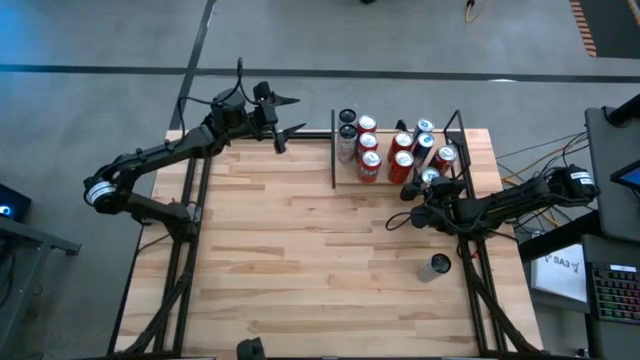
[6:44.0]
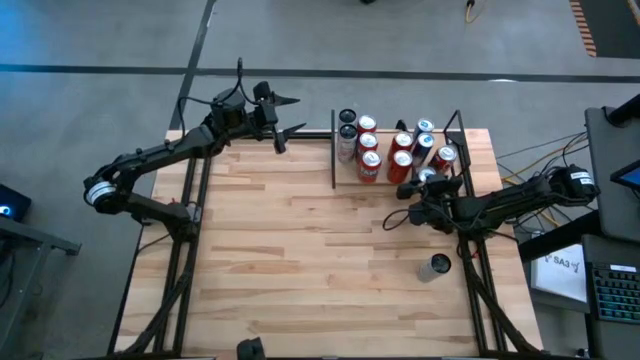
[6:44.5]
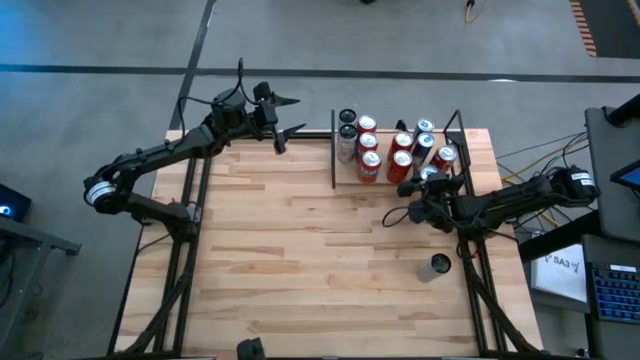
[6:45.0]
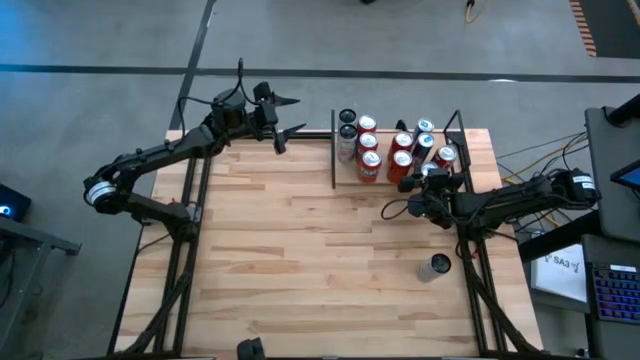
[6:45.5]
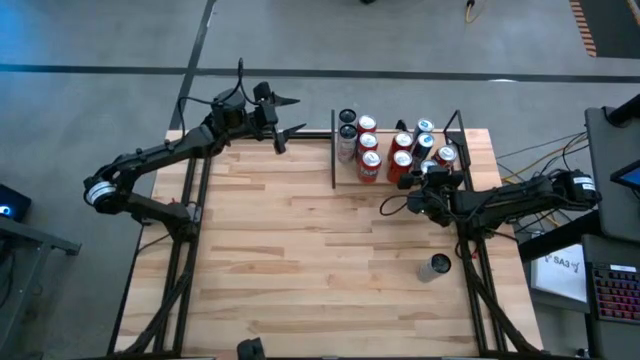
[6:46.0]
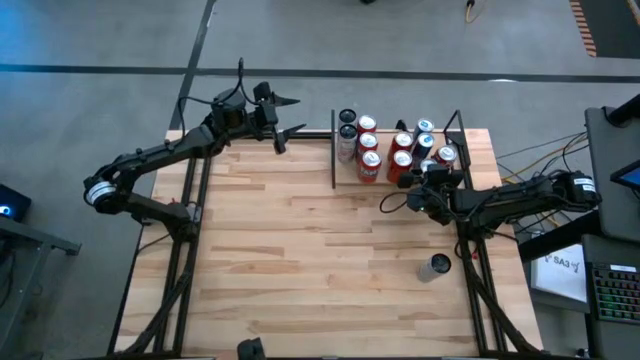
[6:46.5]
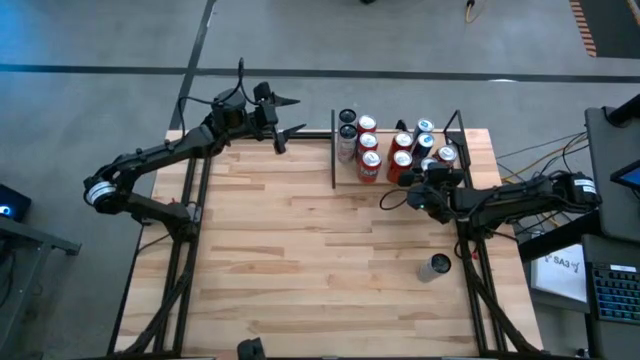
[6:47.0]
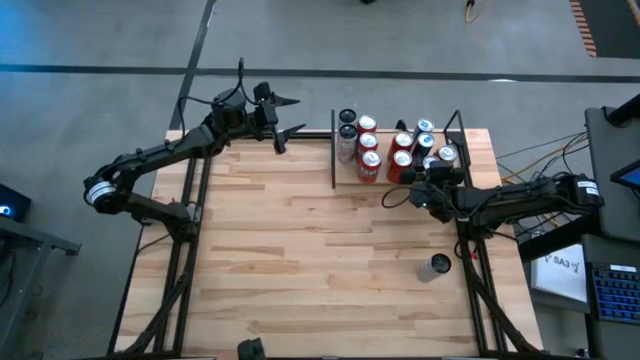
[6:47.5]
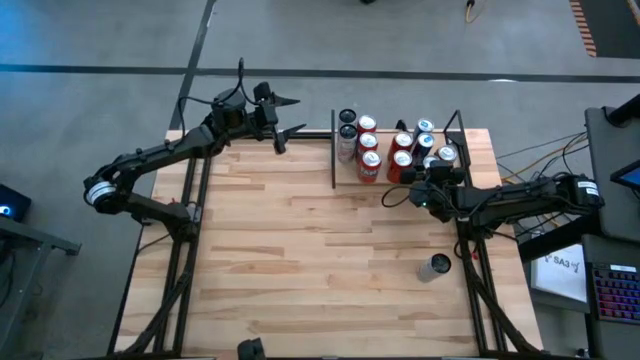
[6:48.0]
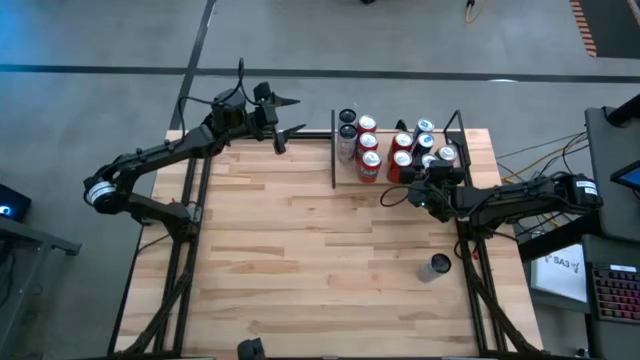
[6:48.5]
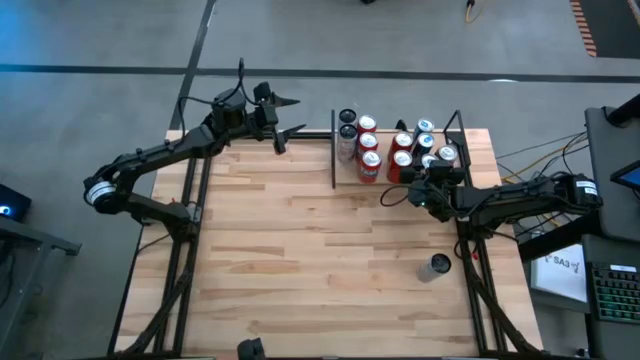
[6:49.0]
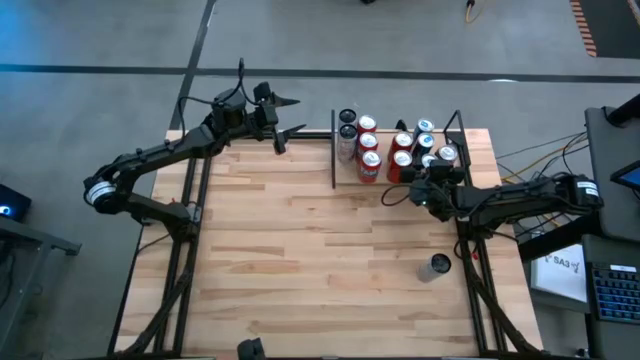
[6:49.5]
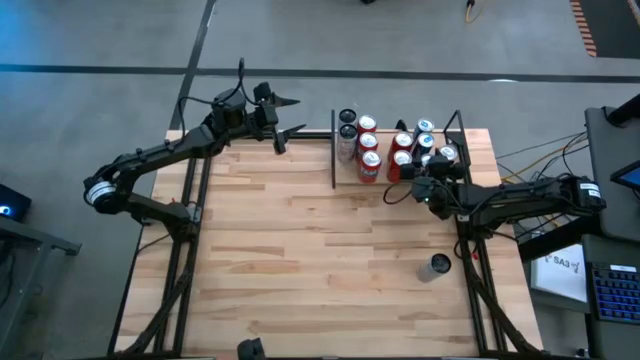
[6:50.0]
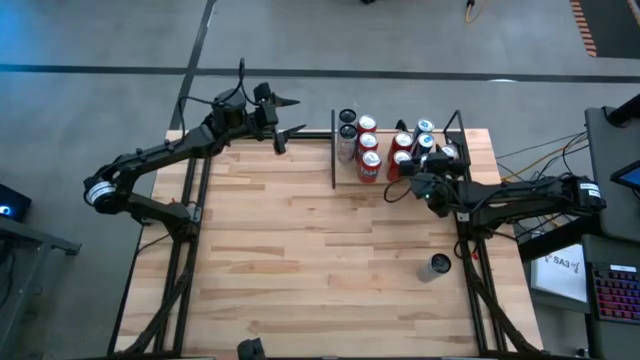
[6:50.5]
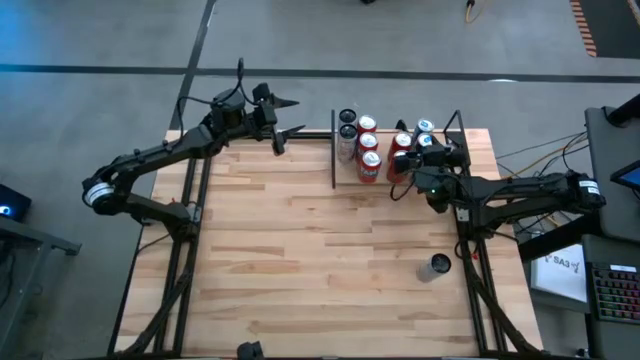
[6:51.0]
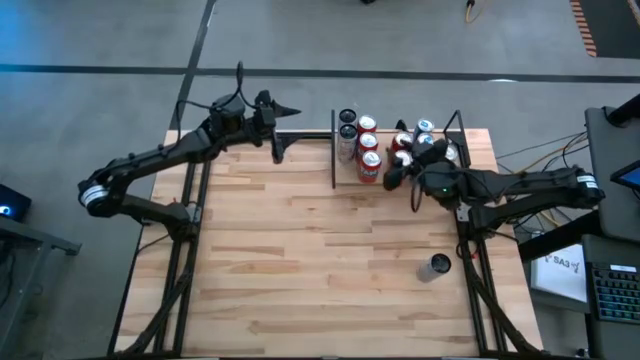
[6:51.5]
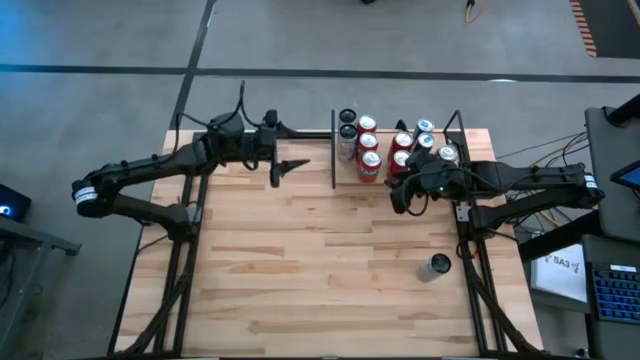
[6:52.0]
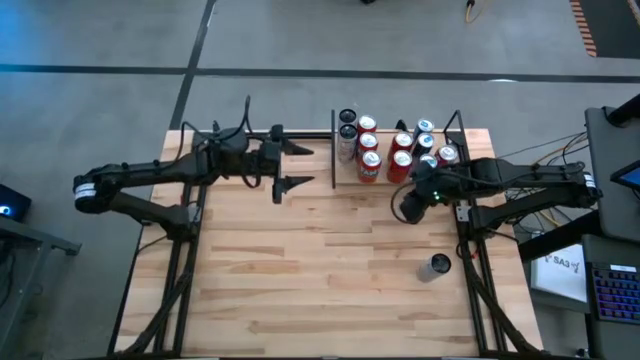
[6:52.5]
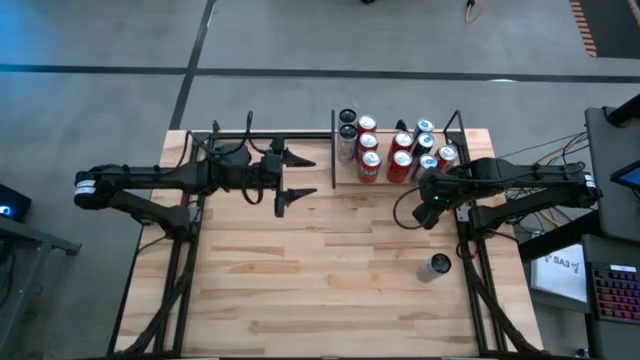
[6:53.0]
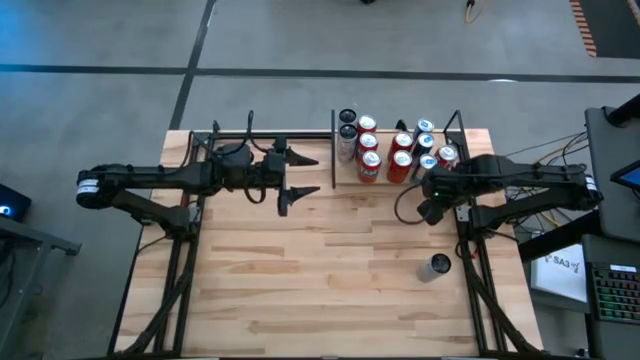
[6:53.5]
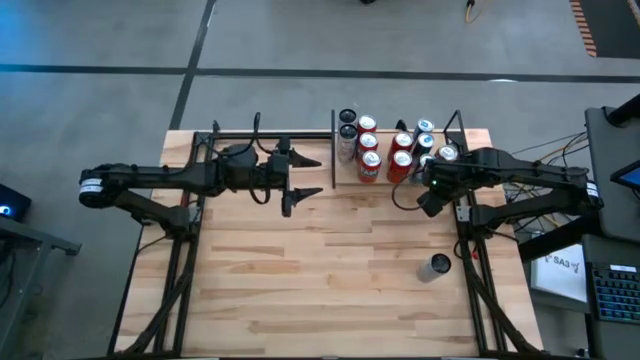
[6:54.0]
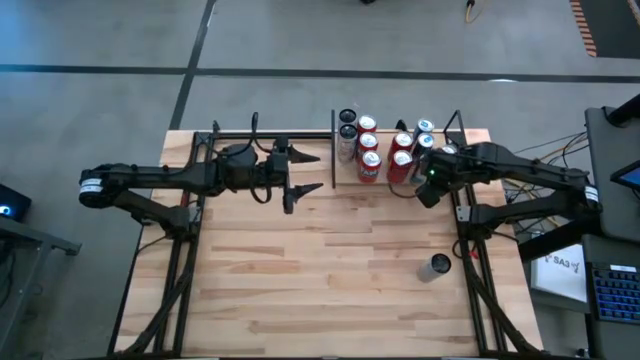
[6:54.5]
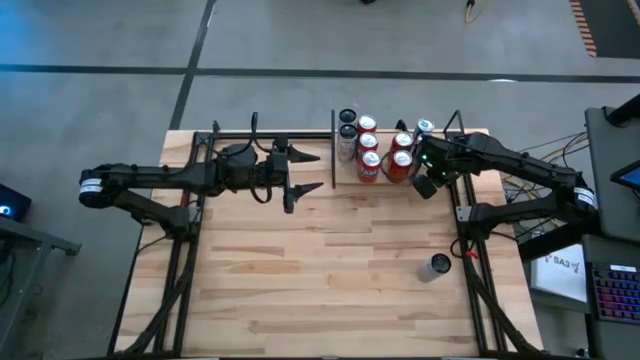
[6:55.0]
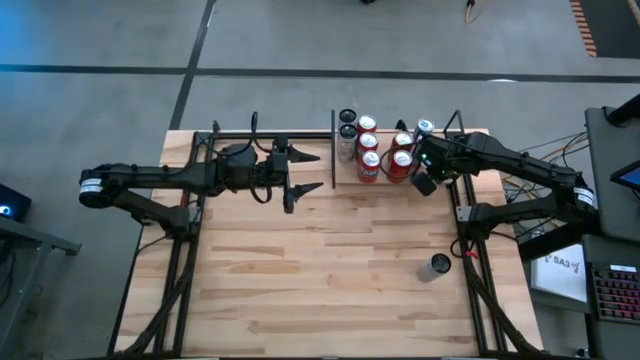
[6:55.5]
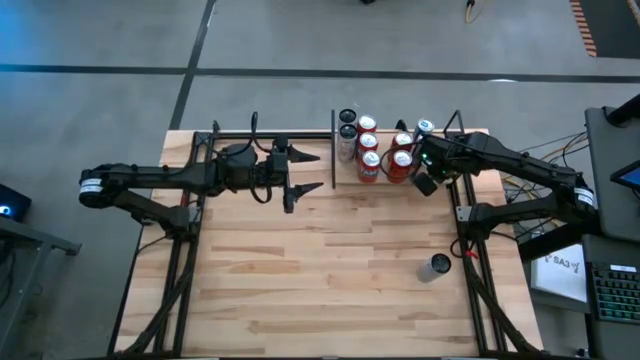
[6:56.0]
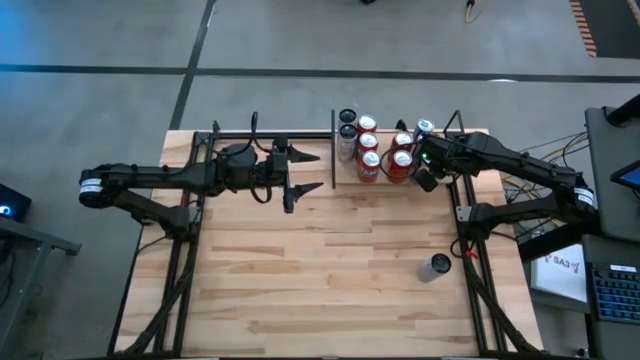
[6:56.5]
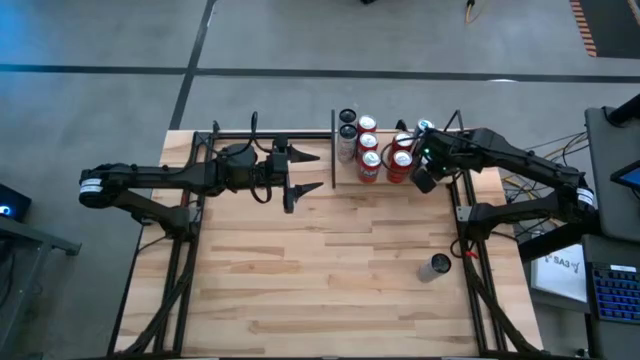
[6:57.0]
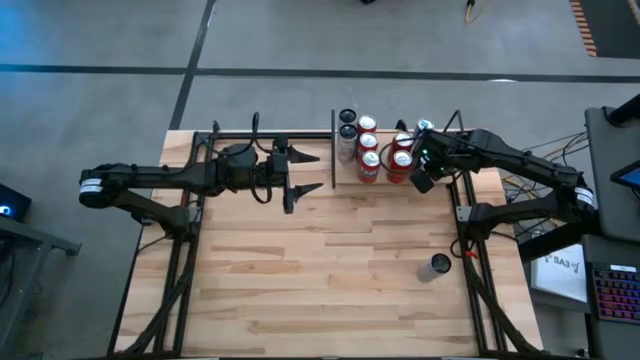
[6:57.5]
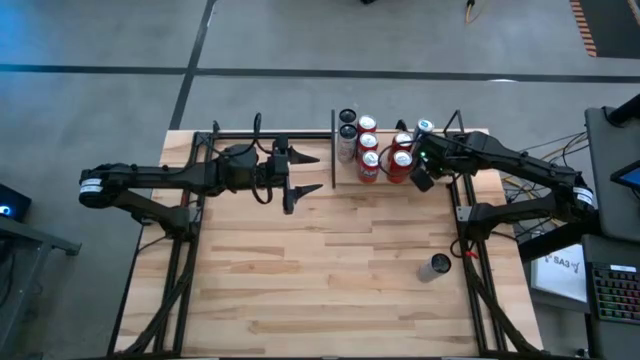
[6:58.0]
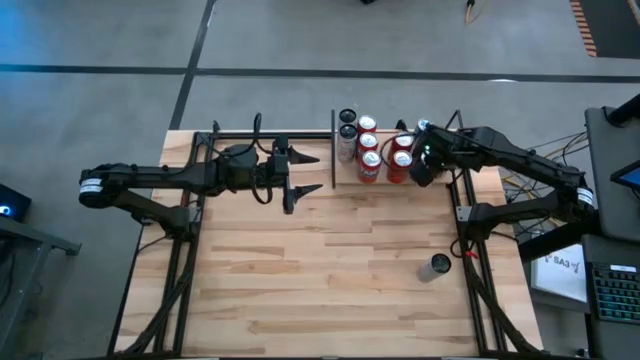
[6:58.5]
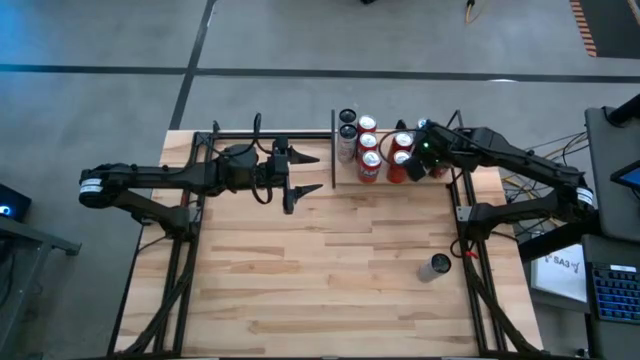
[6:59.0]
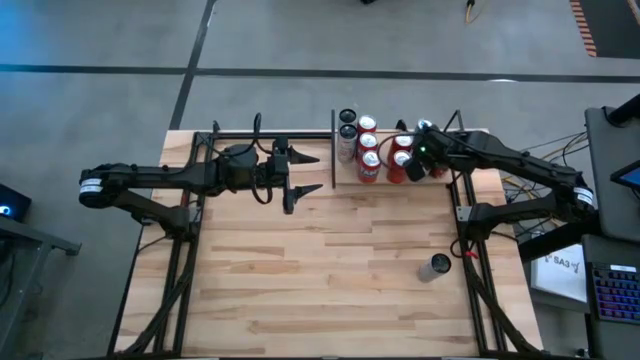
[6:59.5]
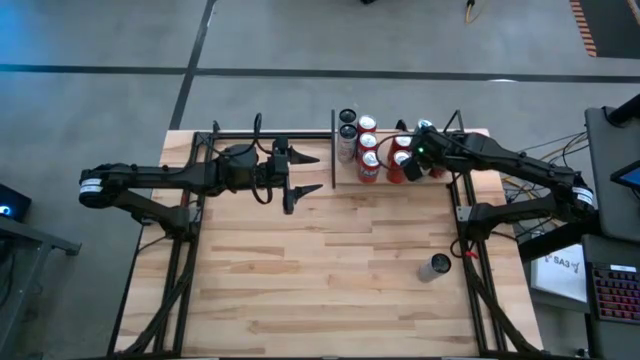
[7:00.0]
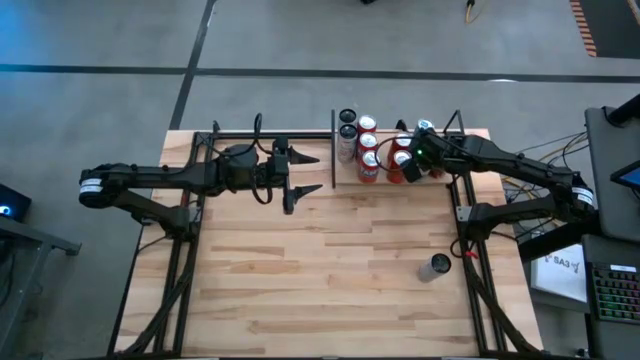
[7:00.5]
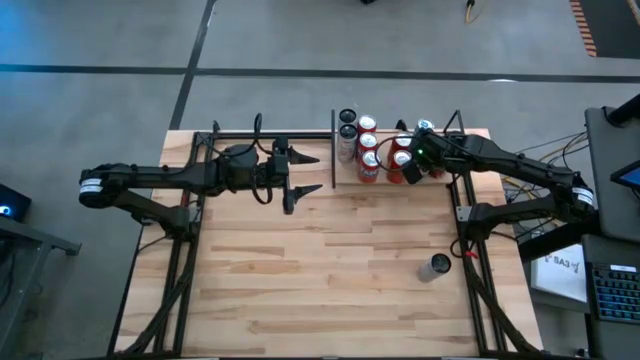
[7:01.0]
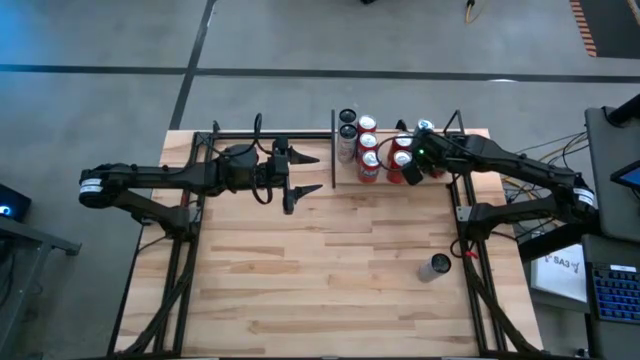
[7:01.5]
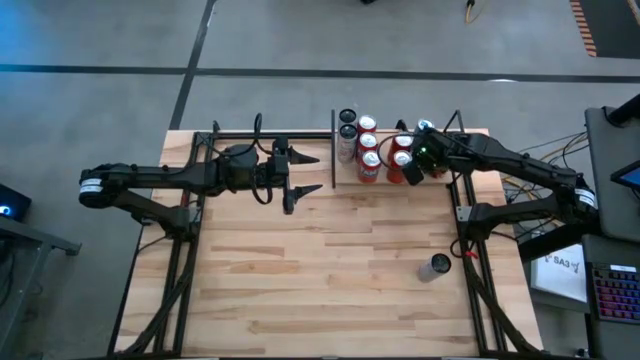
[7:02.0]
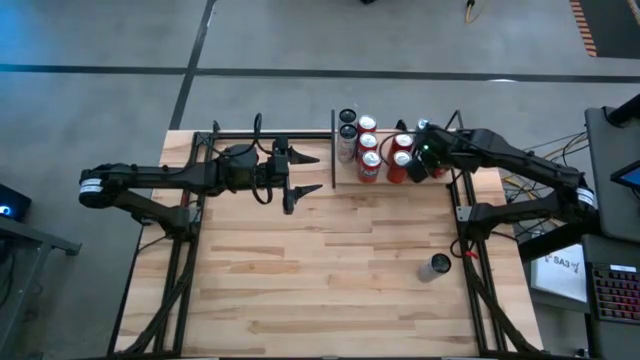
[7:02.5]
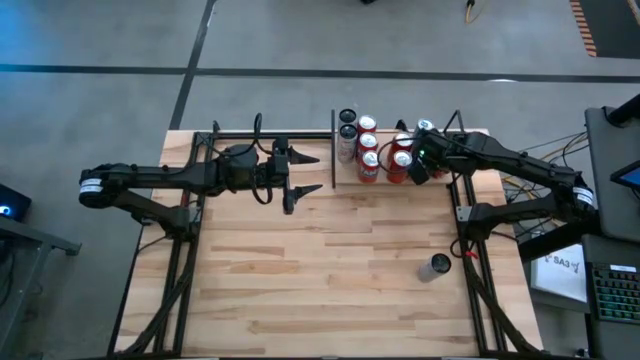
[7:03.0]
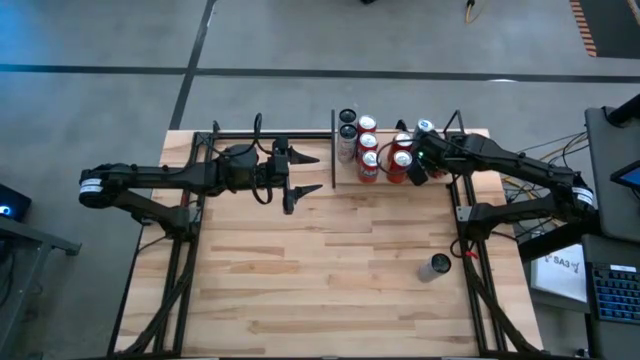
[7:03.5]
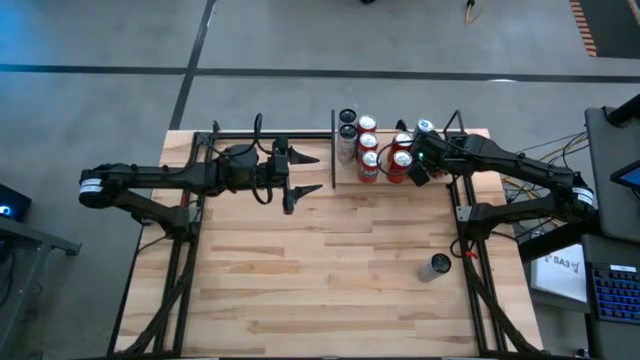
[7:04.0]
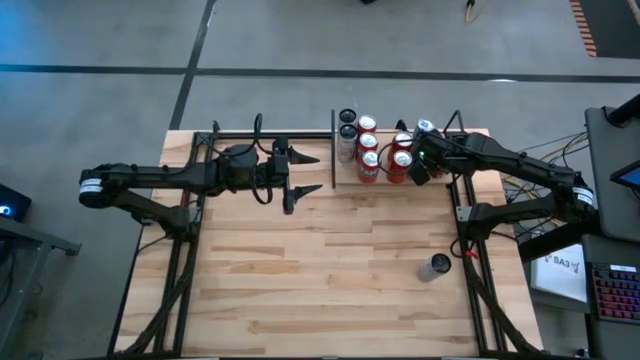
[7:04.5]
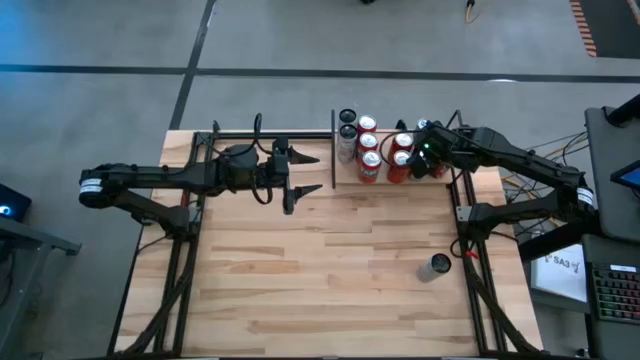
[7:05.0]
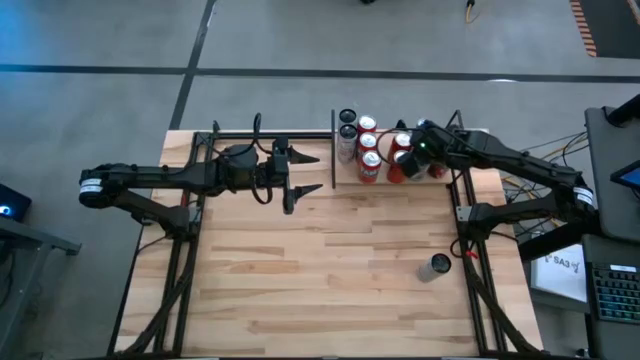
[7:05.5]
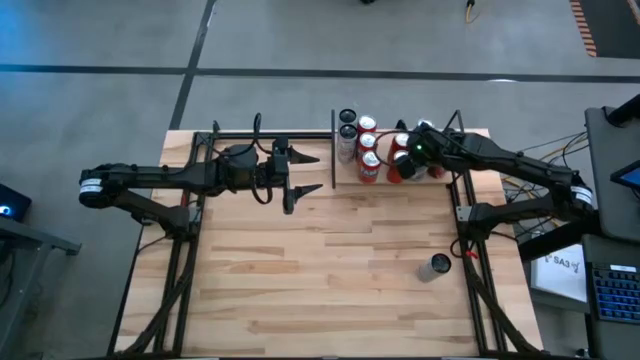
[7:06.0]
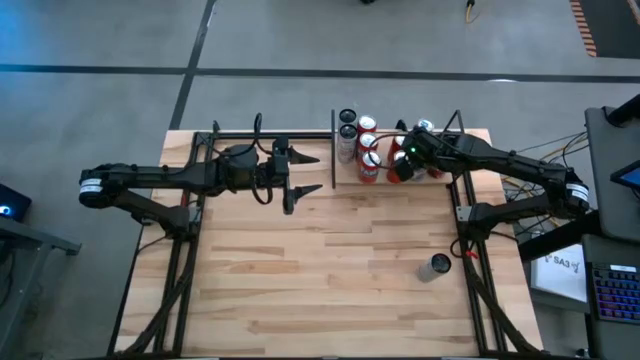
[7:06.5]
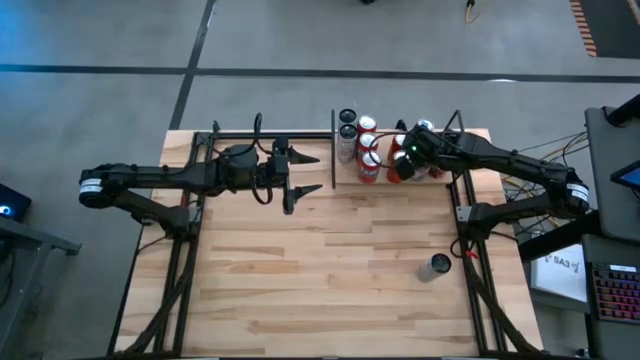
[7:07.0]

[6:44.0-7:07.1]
Task: Place canned beverage on shelf
Put the blue soda can on the shelf aligned with the other blue soda cans
